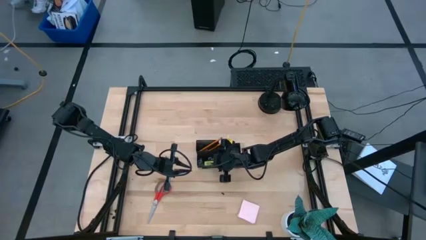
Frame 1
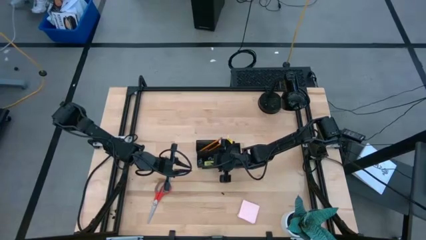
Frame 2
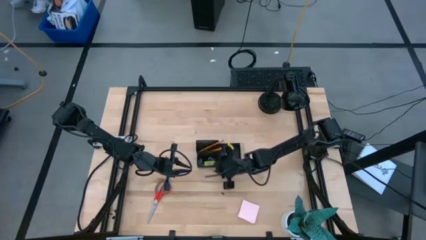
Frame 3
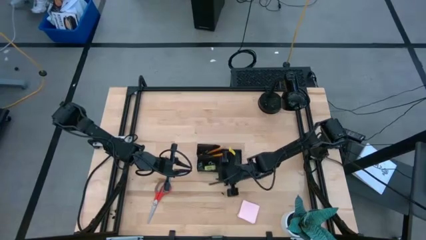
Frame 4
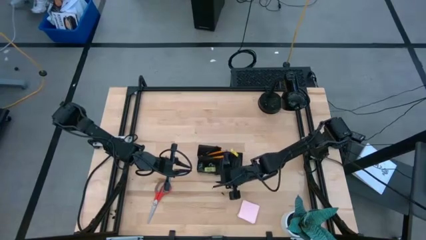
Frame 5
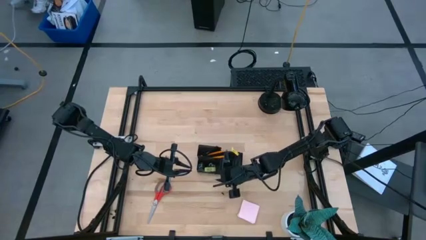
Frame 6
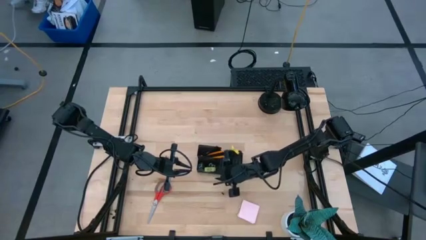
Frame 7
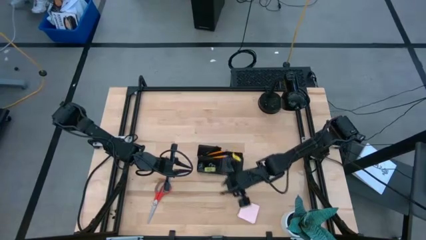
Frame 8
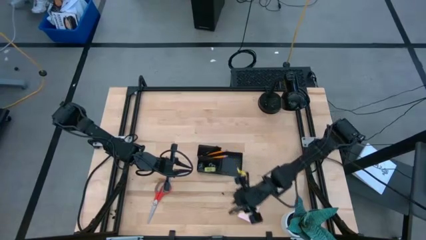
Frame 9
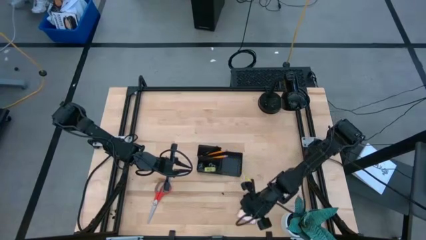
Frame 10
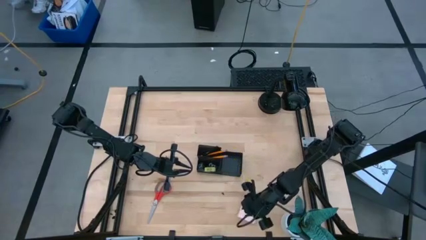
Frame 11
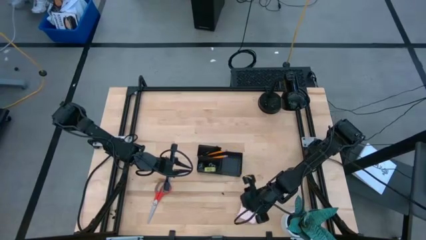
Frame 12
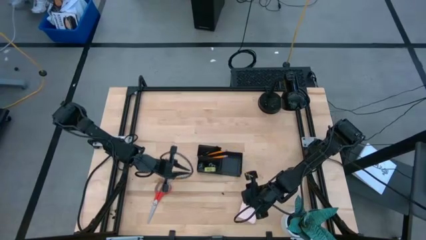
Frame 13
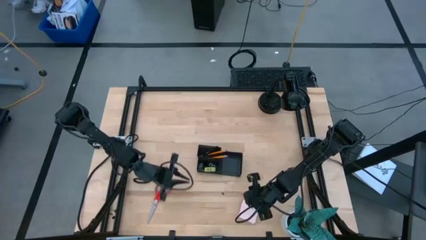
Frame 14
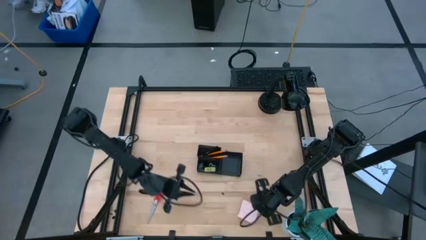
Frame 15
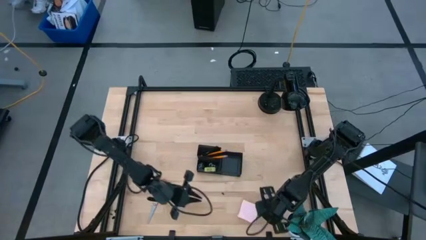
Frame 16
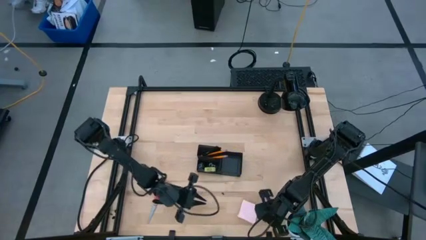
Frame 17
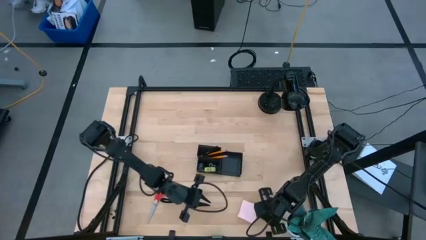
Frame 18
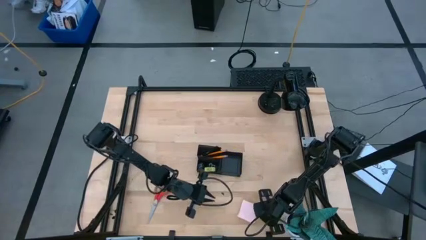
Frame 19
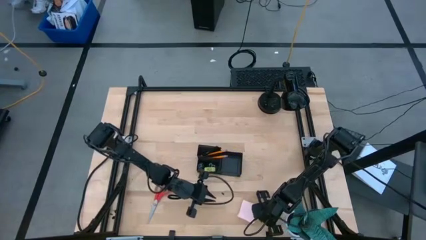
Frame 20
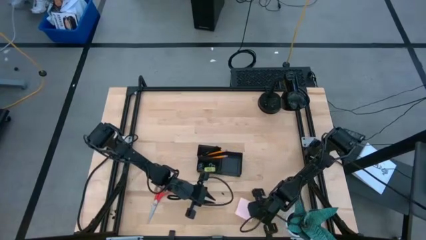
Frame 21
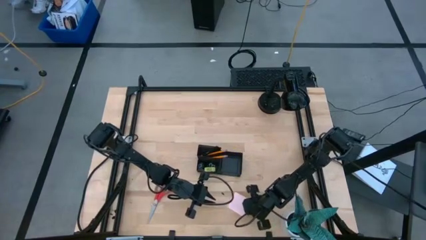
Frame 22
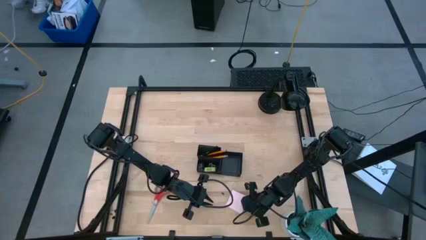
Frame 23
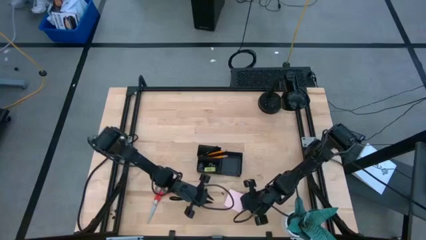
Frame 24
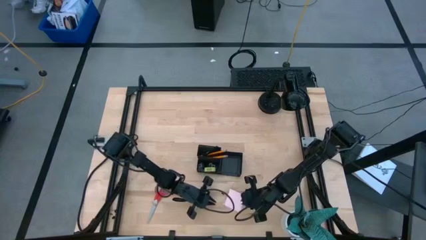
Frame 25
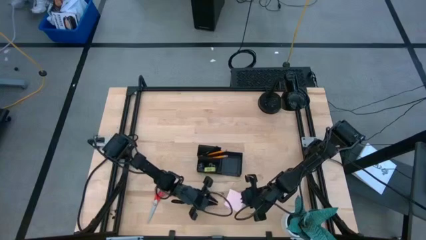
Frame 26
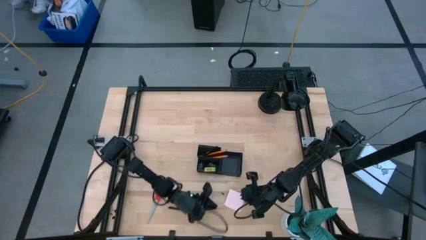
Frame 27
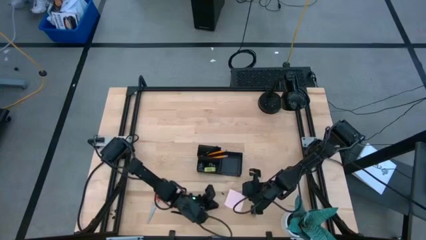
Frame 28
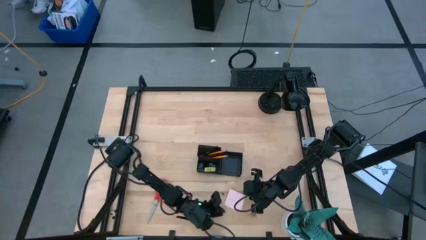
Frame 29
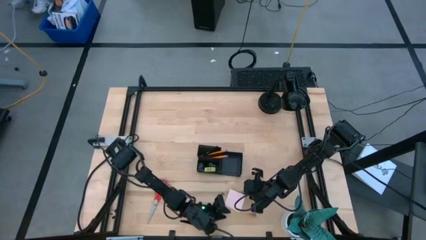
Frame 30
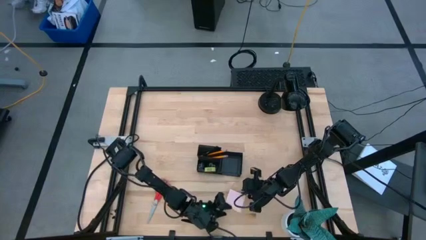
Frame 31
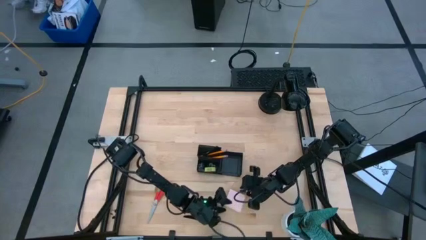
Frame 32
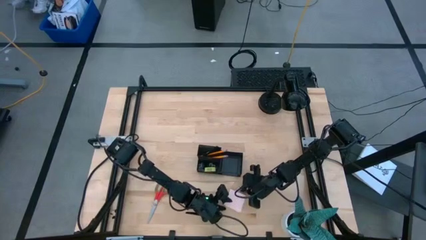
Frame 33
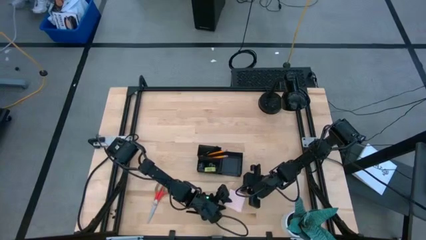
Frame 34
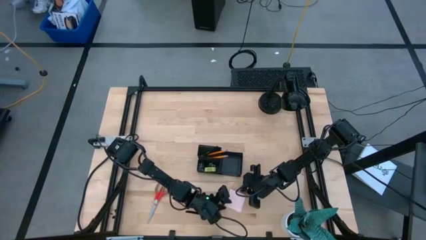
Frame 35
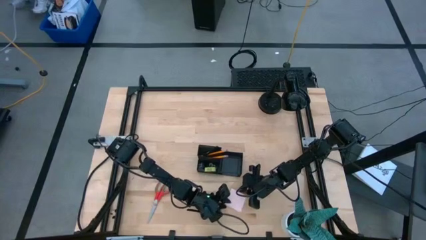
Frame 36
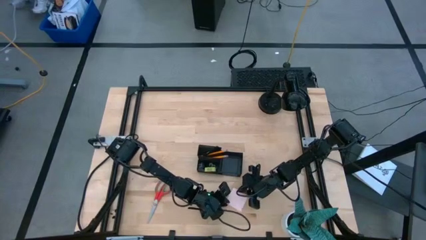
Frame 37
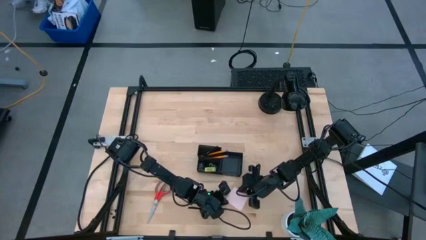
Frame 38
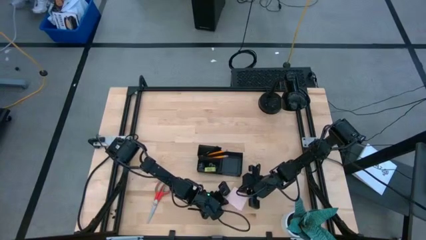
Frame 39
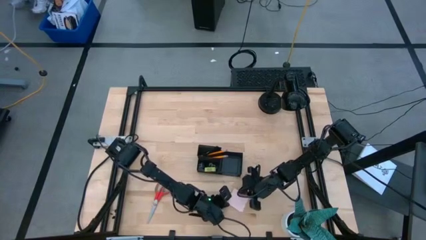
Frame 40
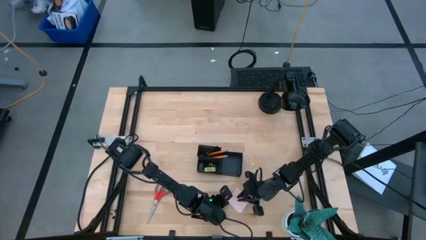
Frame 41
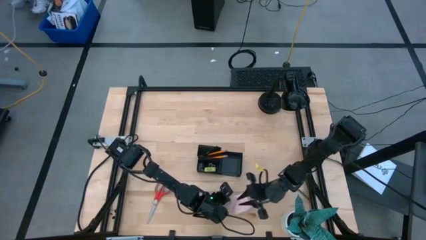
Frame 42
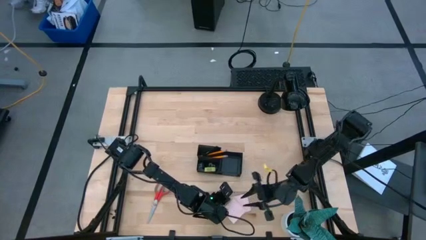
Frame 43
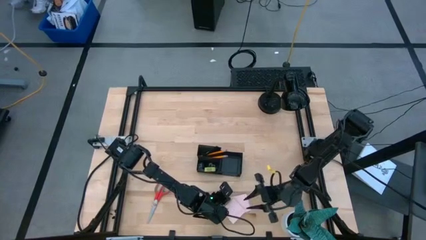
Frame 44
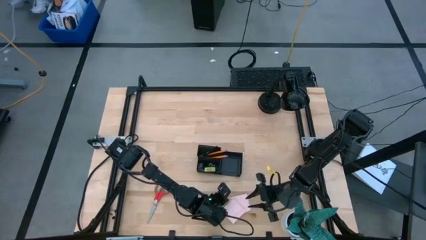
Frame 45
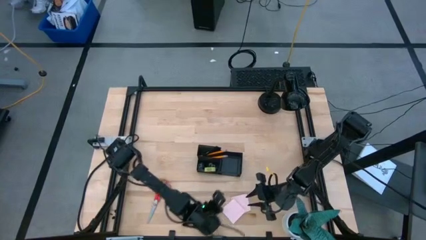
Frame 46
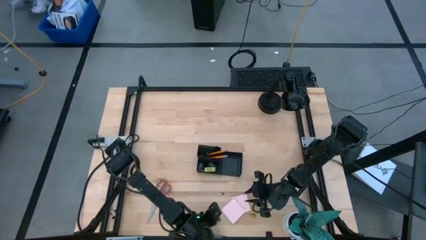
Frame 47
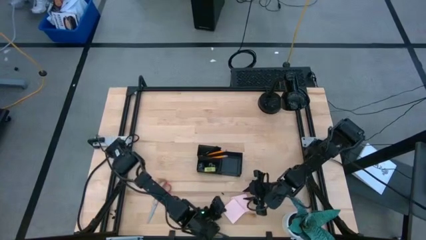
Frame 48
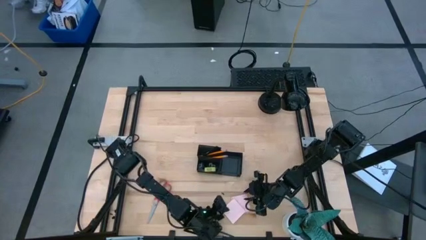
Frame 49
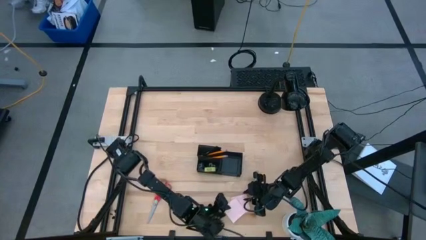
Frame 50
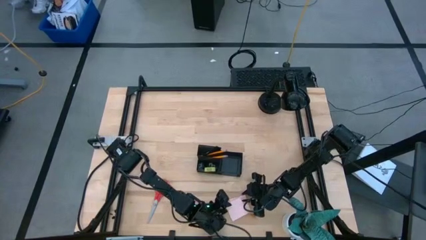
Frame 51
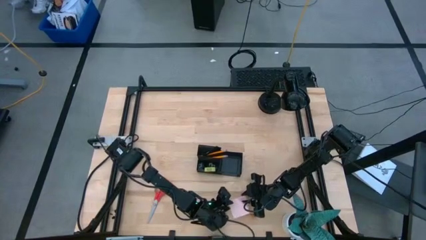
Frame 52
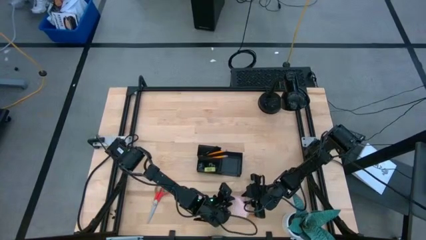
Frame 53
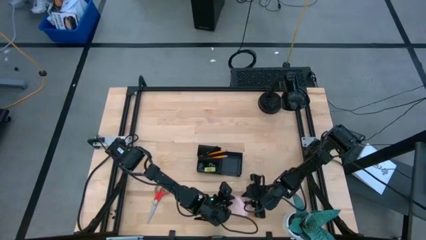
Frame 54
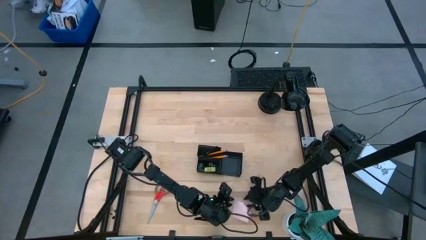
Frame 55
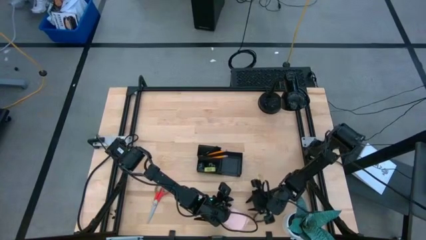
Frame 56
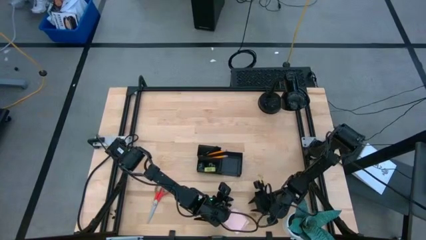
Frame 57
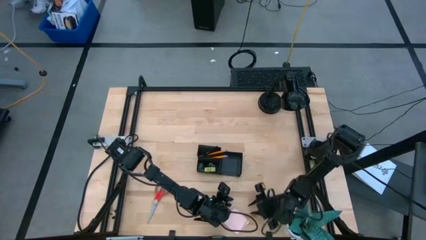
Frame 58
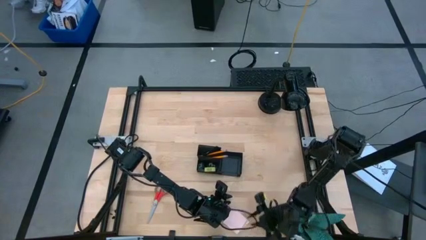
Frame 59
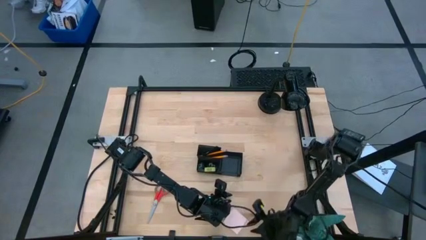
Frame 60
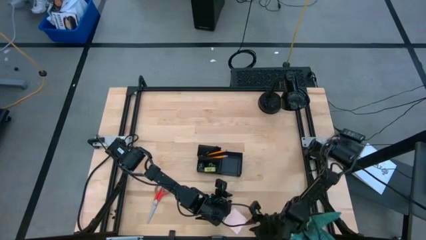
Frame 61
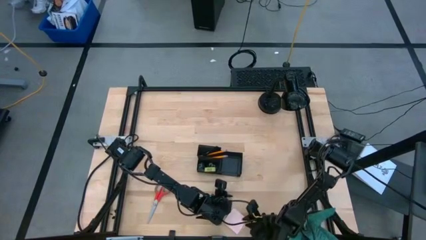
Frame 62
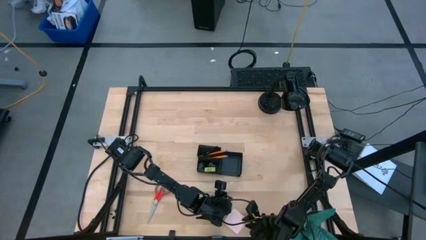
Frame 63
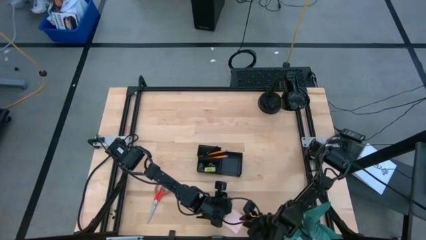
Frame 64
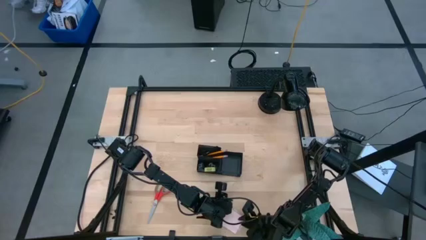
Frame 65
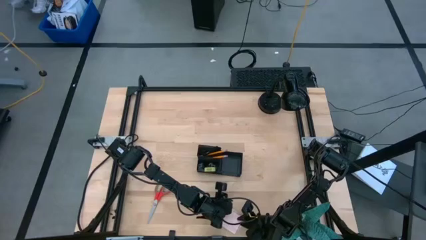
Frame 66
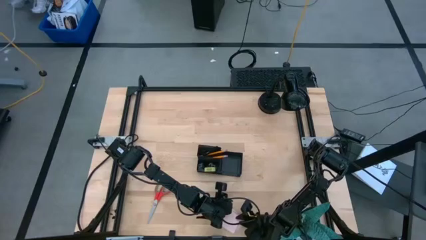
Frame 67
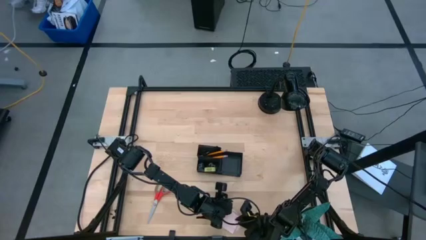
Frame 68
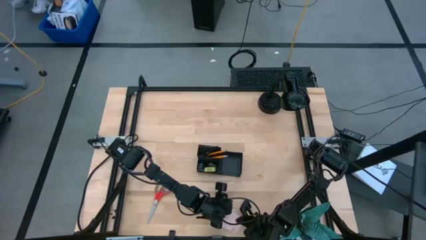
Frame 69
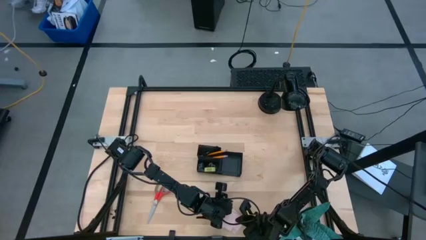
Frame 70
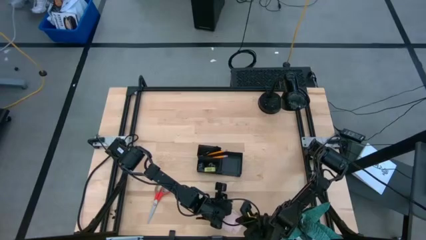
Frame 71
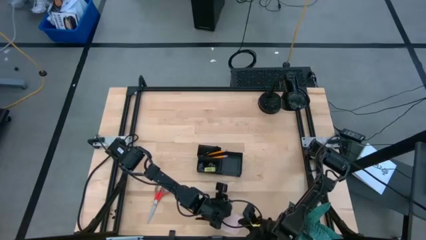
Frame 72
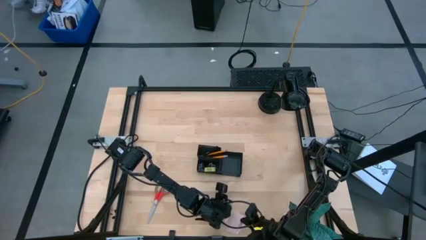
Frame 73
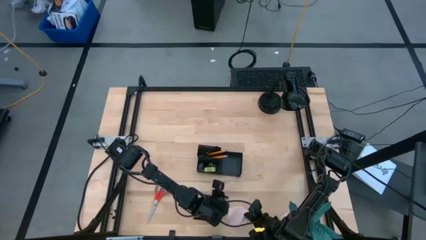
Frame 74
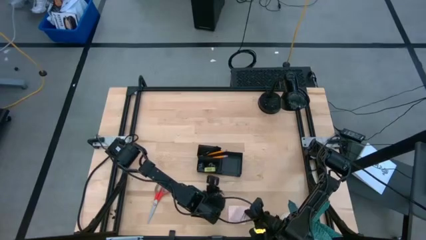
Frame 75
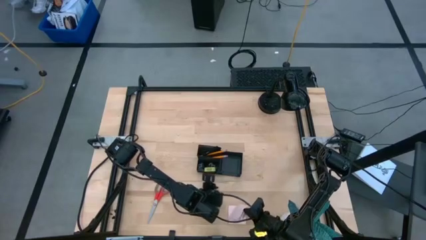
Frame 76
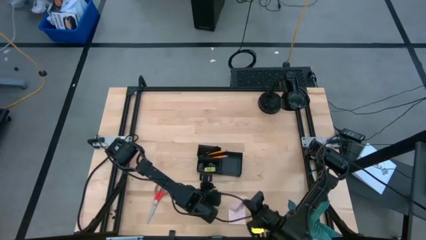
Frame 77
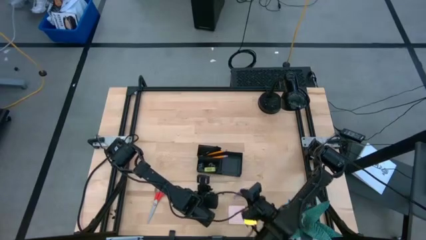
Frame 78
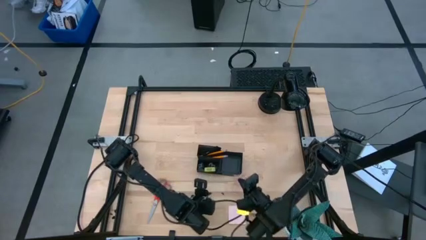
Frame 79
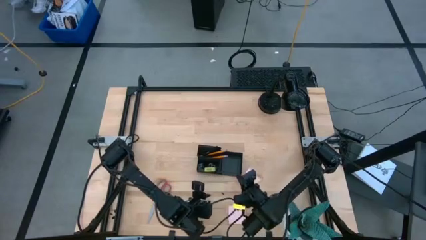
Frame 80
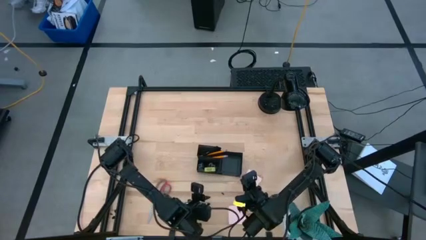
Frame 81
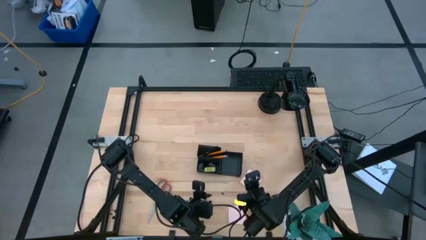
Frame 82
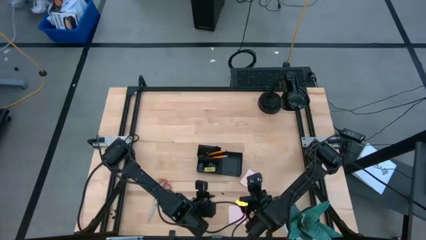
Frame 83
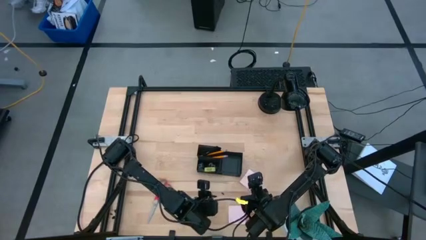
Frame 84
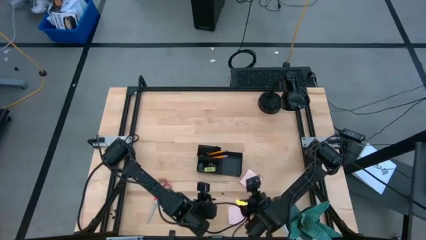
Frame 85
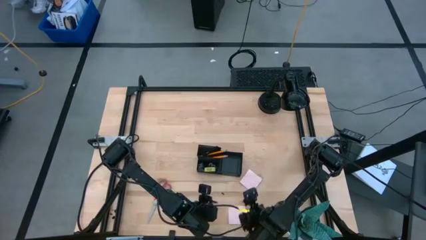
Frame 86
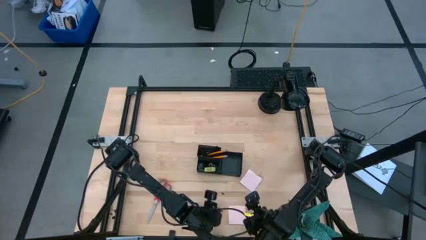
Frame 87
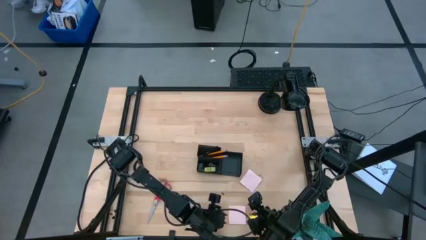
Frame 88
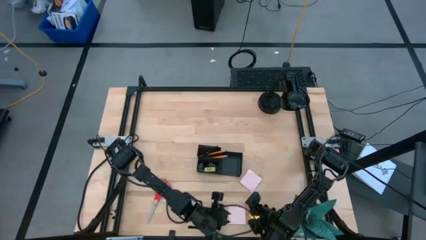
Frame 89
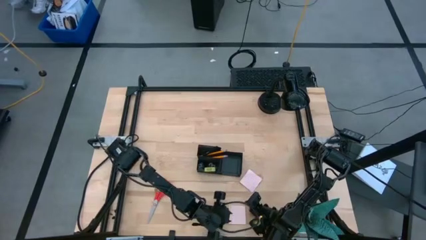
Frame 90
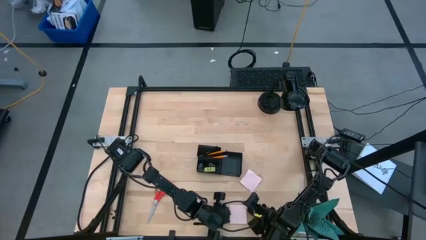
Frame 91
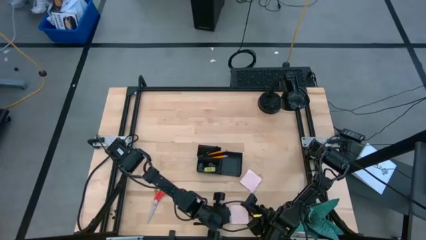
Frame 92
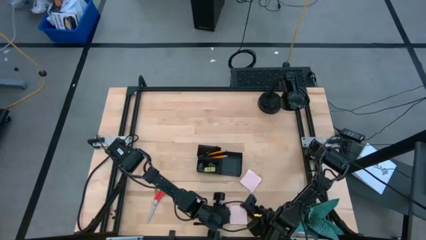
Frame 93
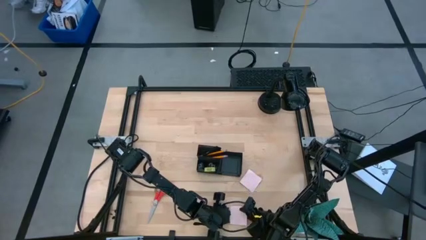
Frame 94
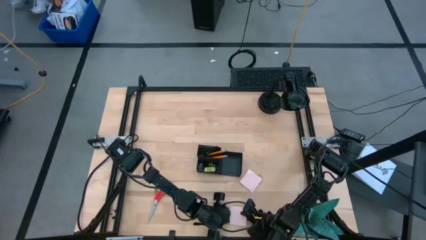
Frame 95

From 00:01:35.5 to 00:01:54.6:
Task: Pick and place office supplies into organizer
Put the top sticky notes into the right section of the desk organizer
